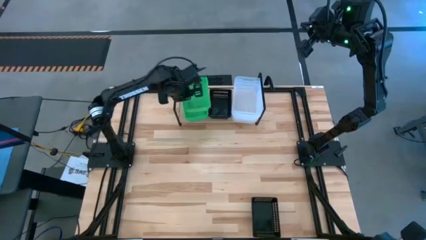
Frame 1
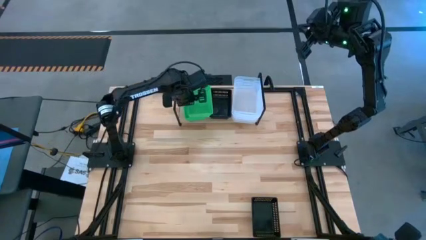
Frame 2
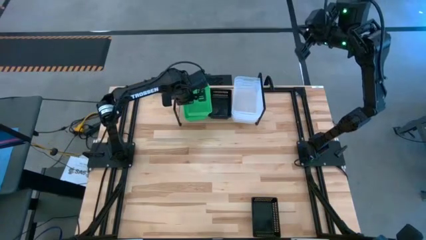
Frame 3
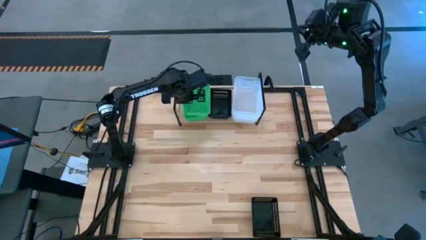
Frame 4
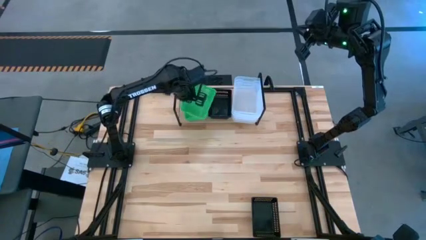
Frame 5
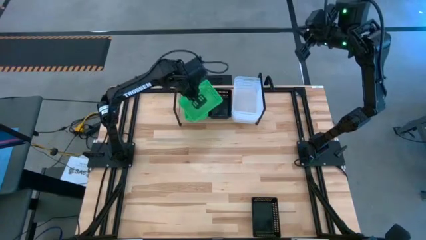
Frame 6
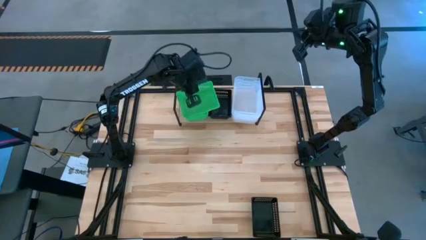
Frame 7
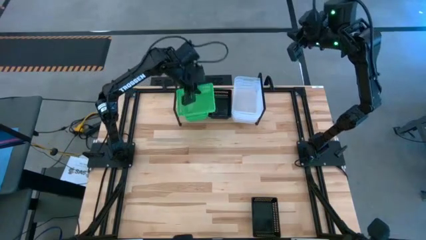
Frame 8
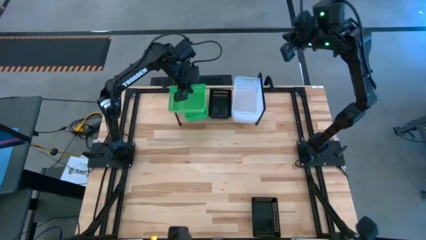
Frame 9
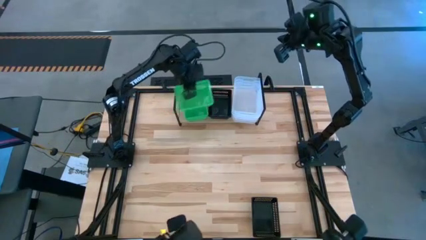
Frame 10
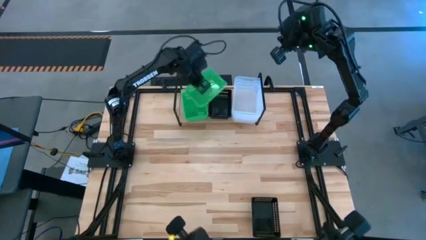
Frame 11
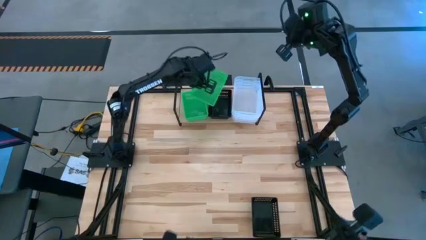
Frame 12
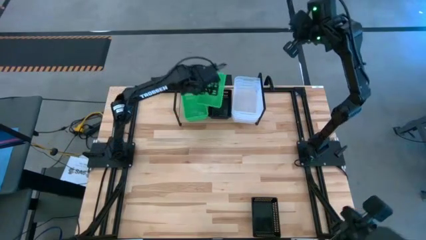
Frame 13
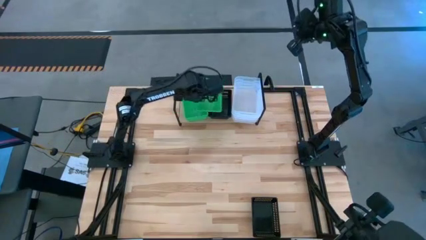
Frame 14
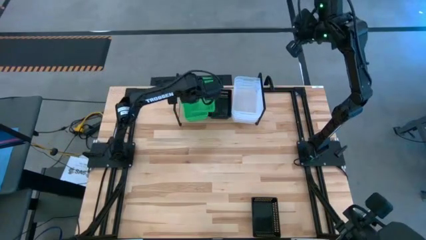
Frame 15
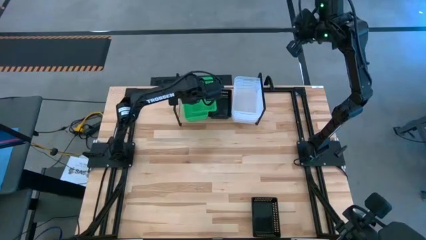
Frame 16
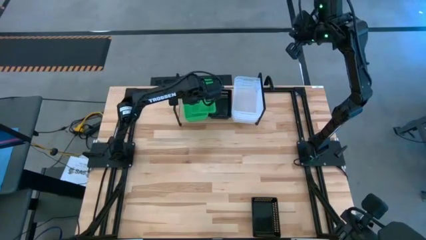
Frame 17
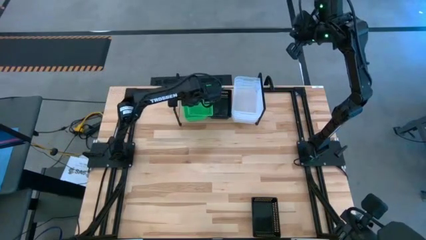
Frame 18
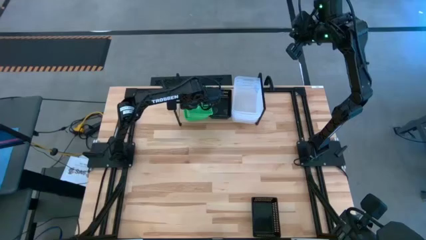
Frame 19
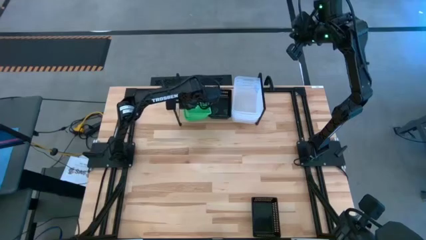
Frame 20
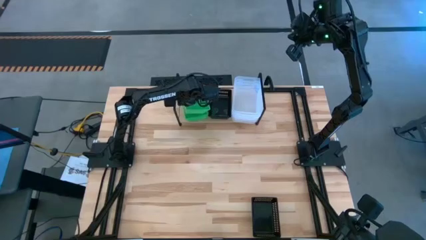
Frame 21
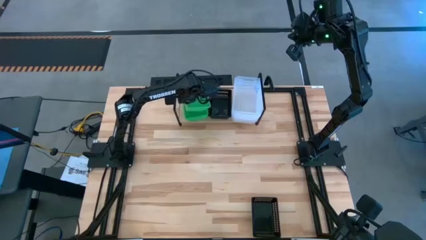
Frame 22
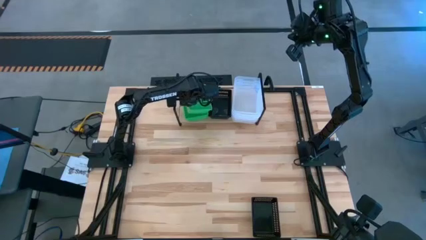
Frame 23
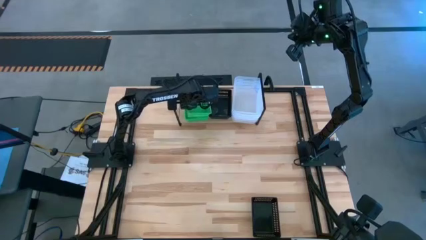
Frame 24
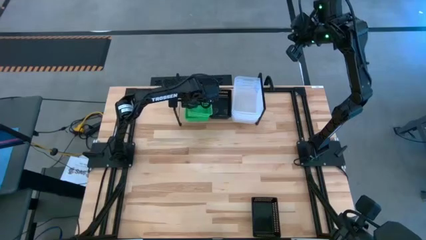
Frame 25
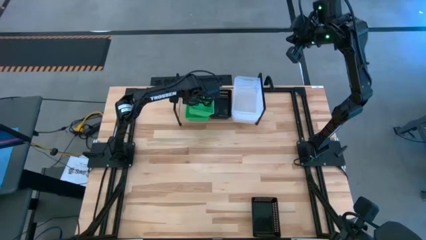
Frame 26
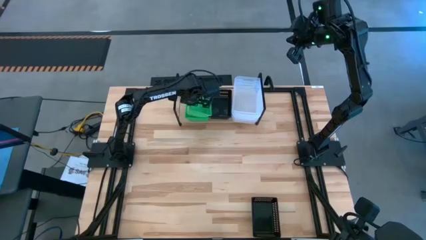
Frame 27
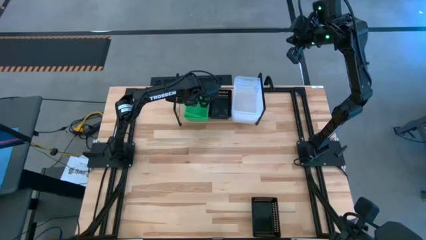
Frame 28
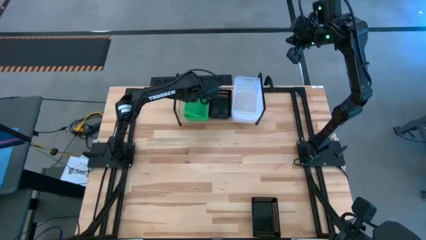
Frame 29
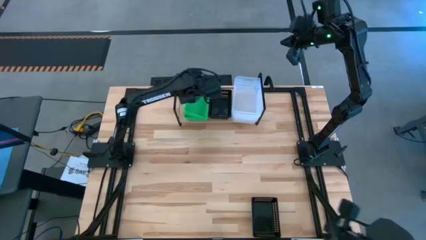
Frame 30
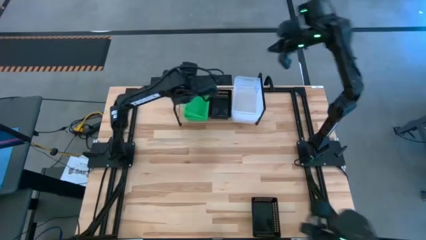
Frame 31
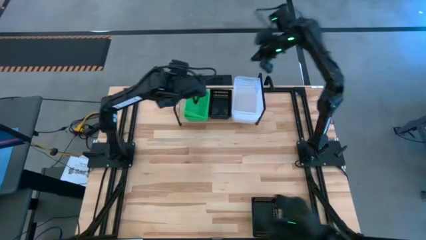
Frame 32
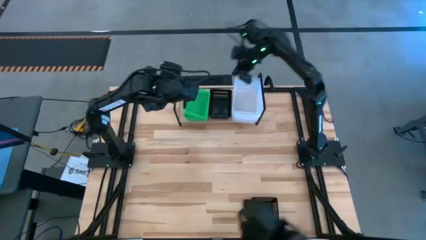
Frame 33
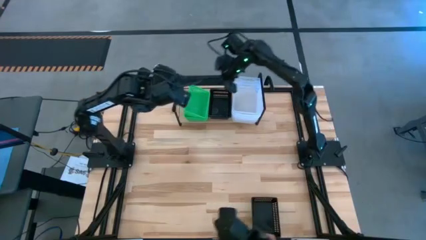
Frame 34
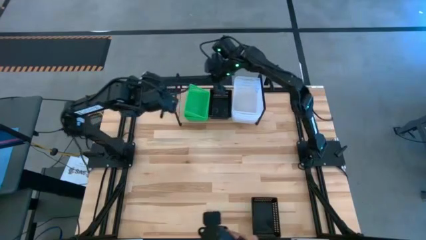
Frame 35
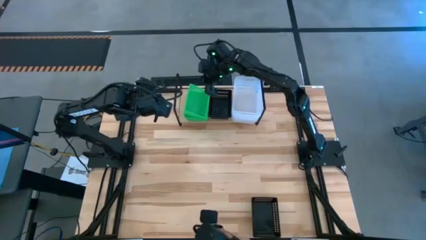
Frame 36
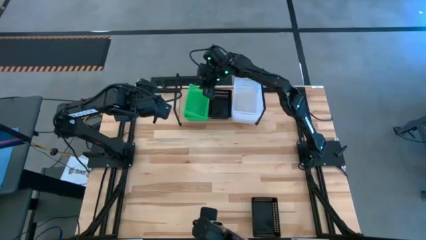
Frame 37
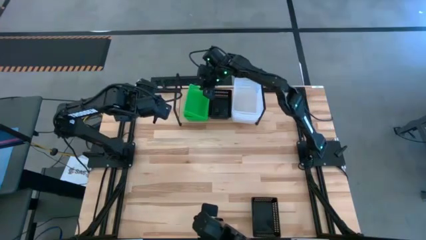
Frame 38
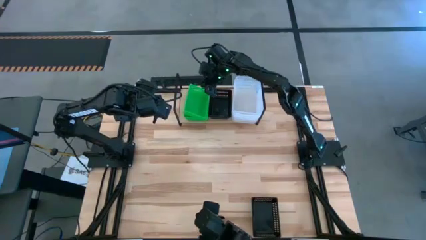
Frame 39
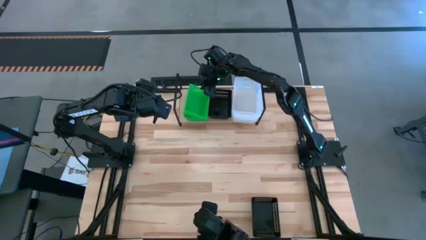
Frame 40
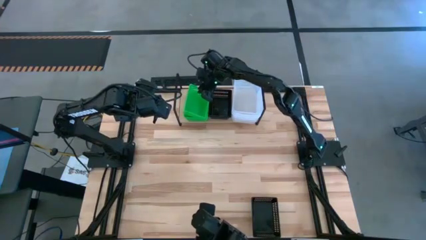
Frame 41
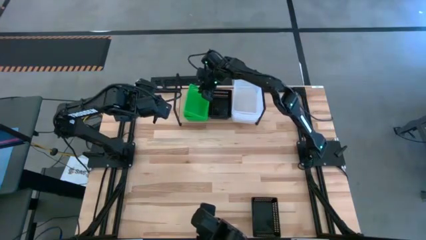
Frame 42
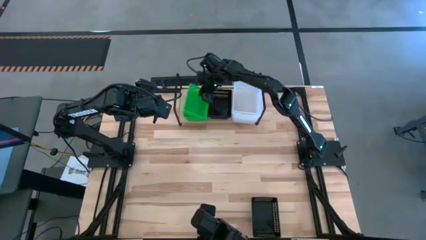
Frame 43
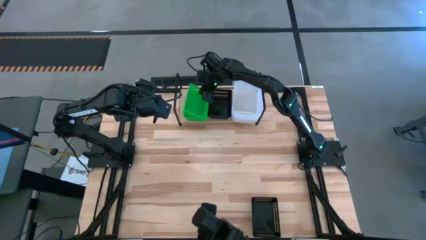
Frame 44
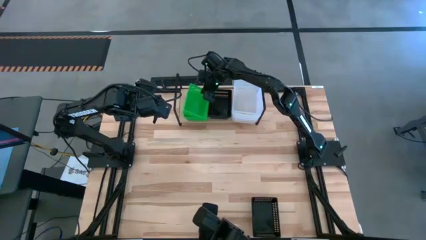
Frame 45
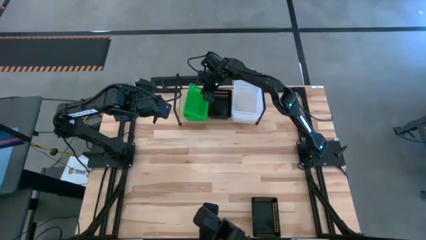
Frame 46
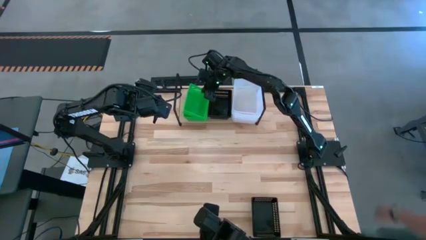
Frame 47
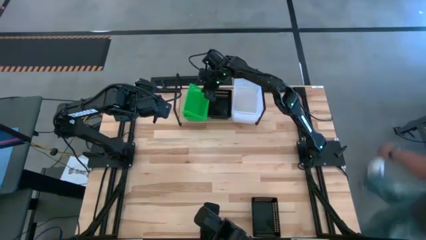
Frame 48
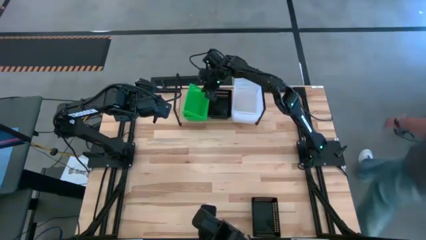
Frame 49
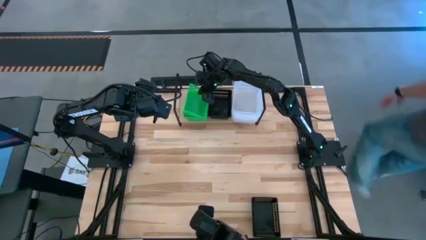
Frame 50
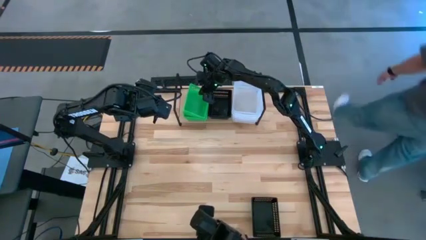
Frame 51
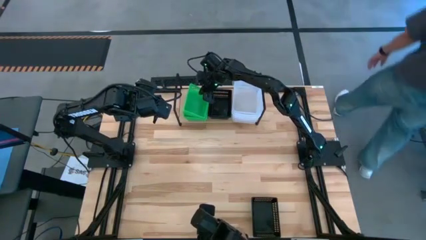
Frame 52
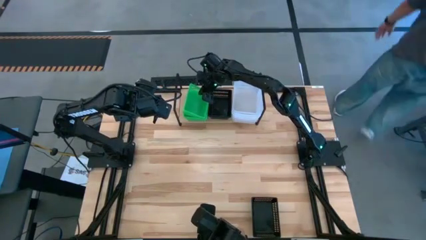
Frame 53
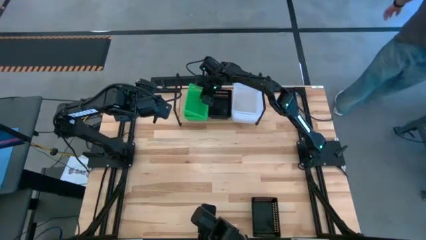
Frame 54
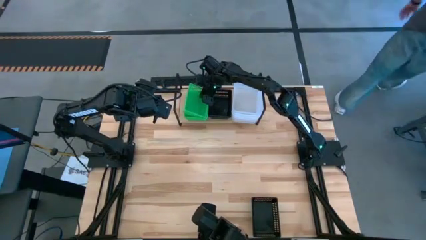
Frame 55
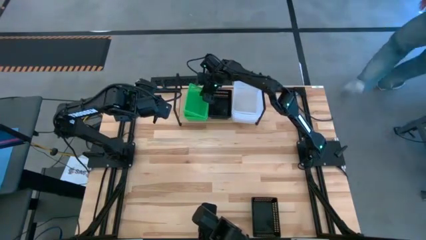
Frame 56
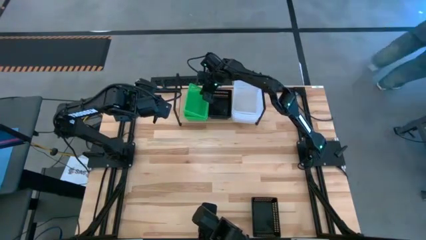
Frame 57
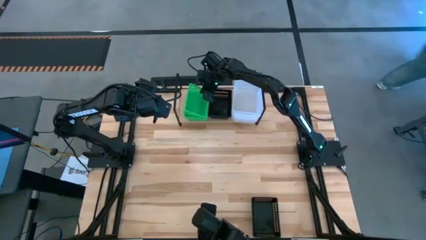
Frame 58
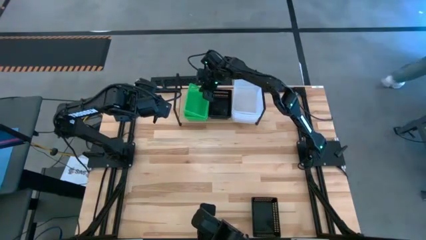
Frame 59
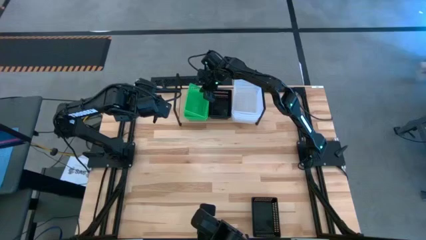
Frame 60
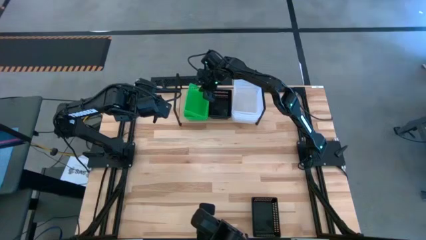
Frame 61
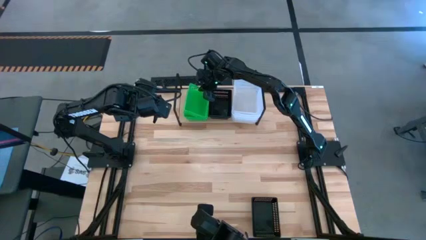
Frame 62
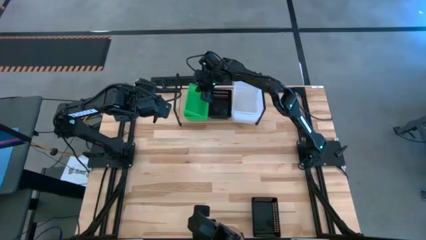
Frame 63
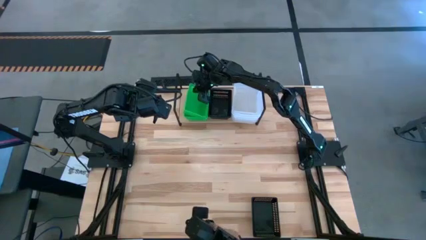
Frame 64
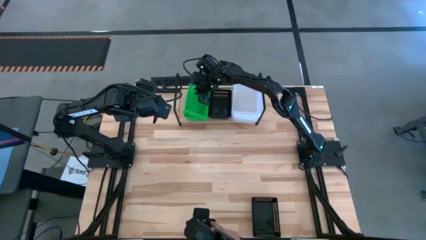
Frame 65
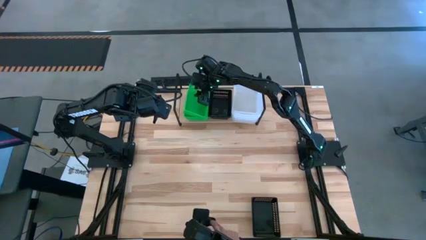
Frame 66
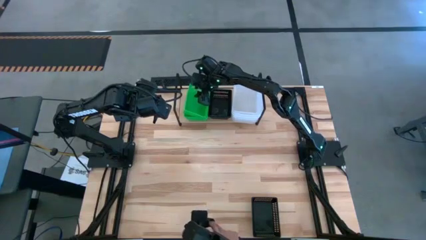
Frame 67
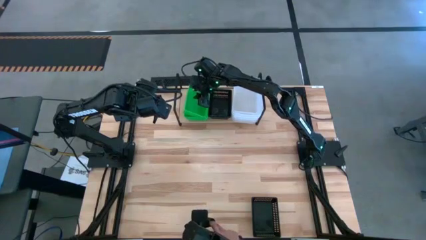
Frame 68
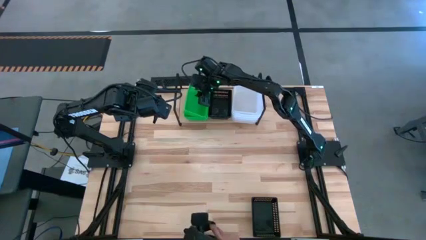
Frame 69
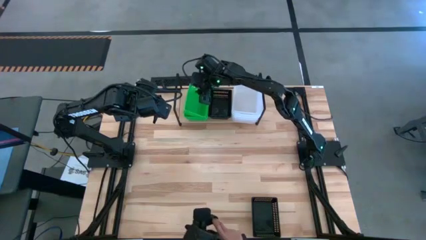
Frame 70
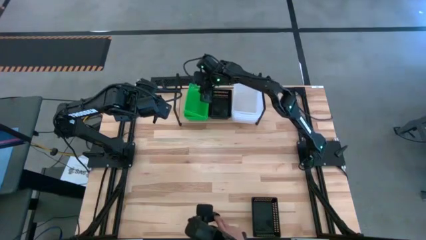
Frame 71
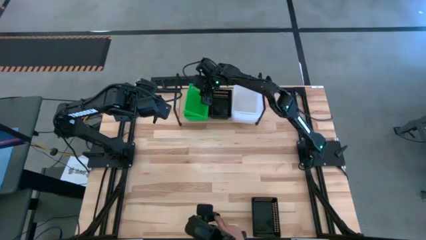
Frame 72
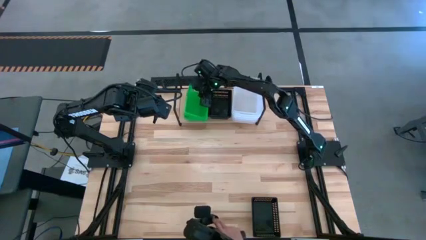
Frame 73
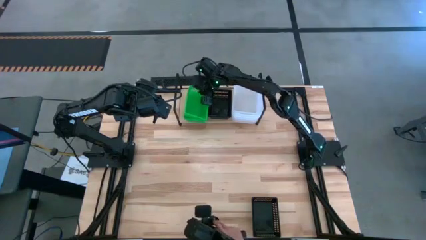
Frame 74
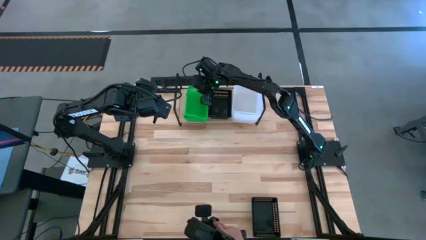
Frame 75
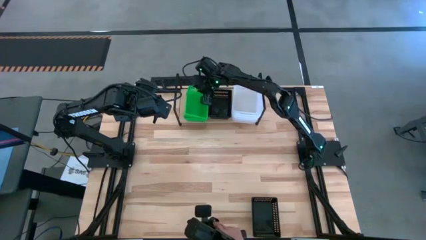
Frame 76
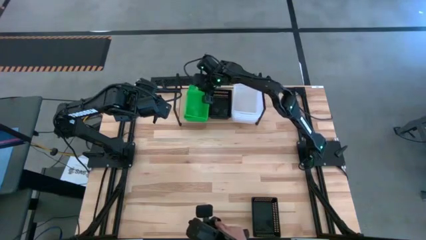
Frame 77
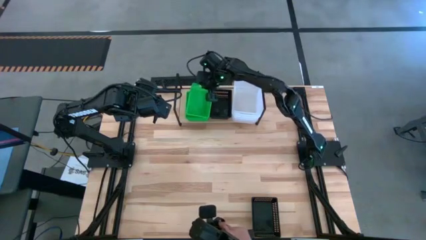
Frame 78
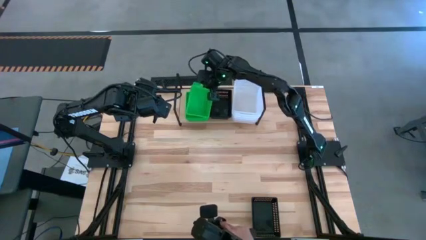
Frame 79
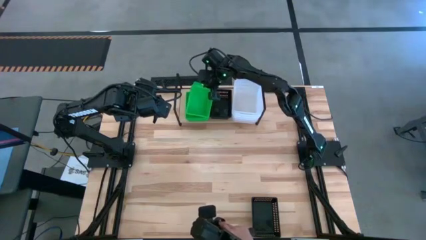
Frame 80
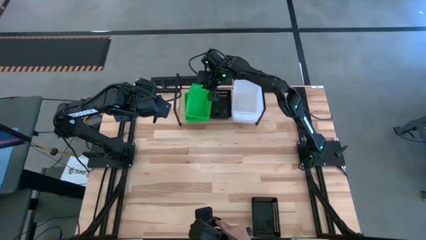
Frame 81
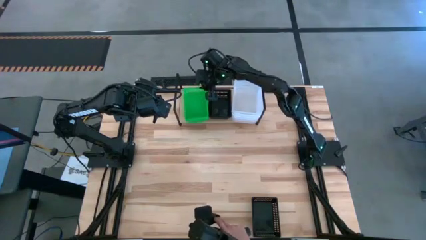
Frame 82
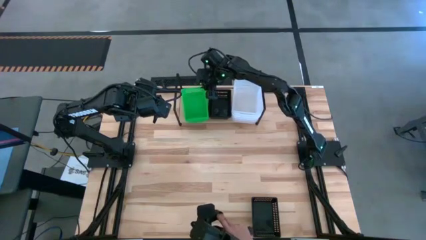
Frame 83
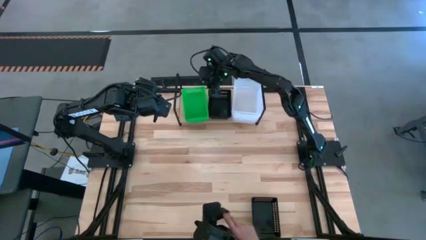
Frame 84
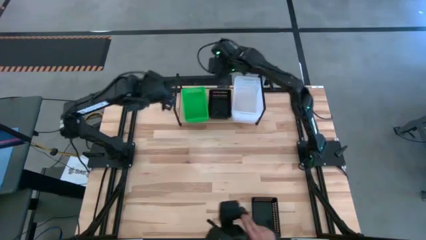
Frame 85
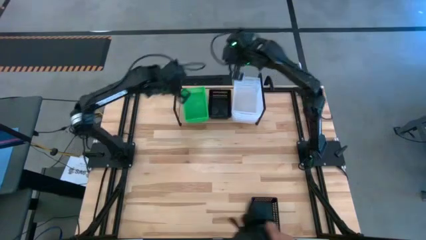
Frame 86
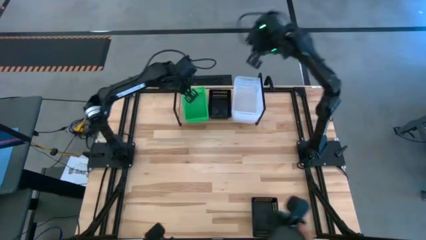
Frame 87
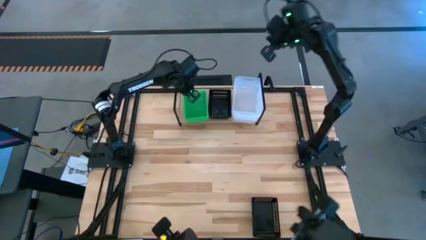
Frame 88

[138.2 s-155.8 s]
Task: Stack baskets on shelf by color
Stack the green bin into the green bin on the shelf
